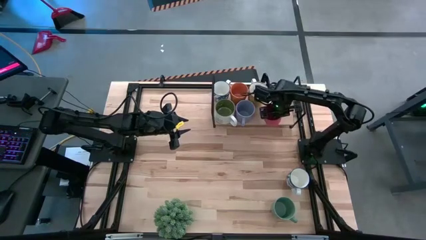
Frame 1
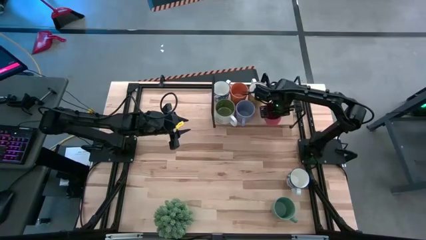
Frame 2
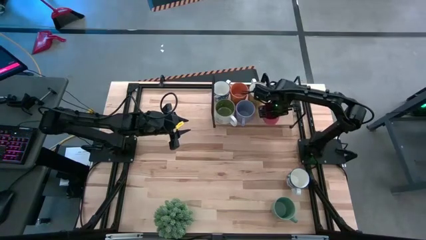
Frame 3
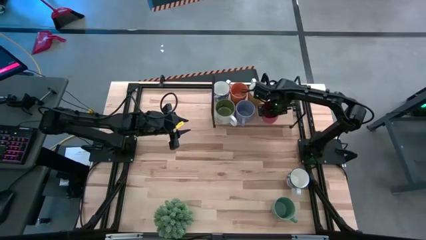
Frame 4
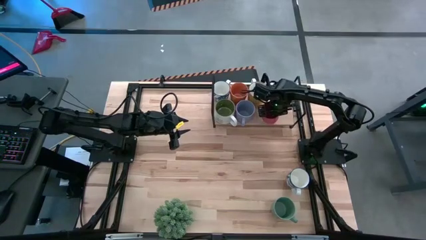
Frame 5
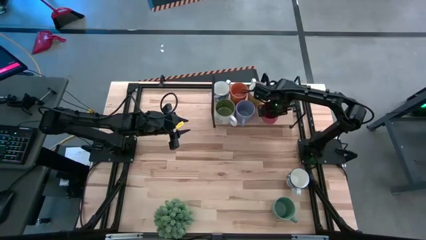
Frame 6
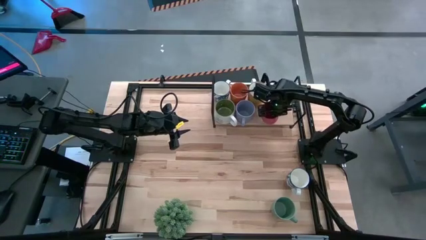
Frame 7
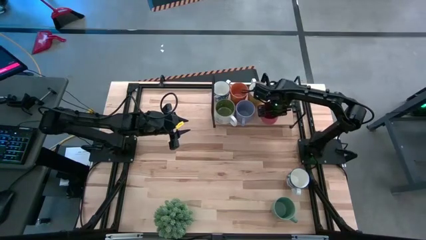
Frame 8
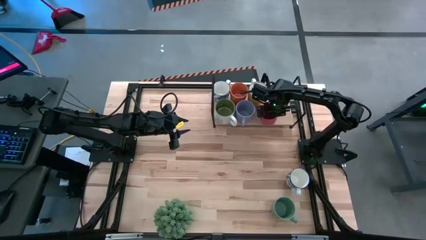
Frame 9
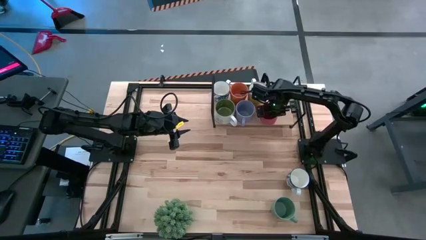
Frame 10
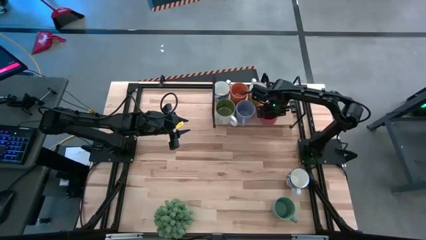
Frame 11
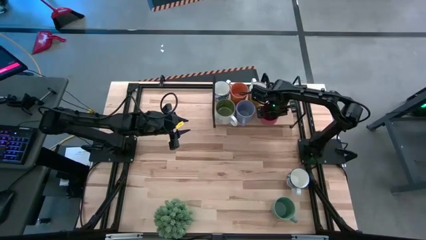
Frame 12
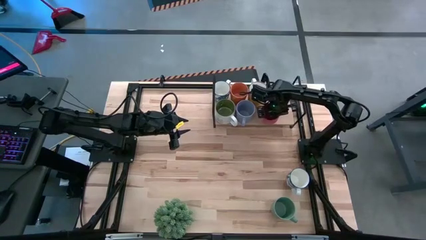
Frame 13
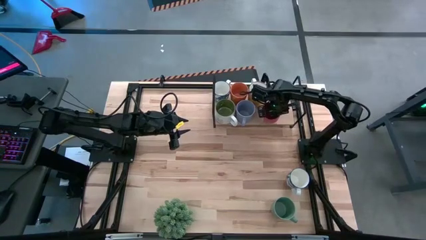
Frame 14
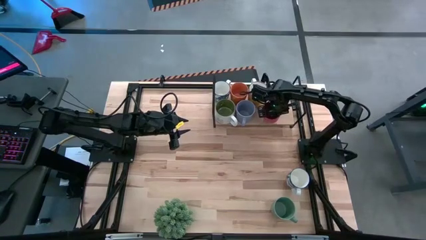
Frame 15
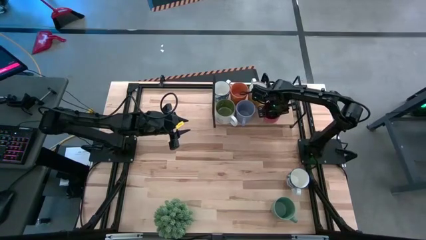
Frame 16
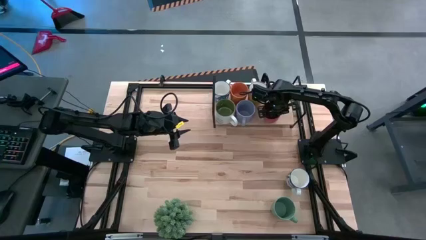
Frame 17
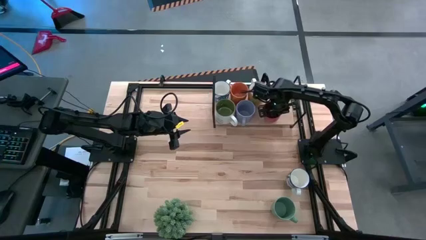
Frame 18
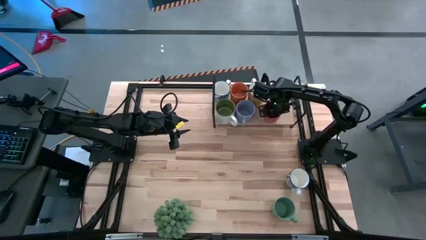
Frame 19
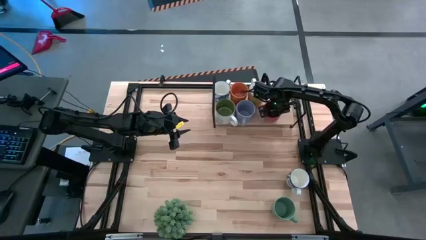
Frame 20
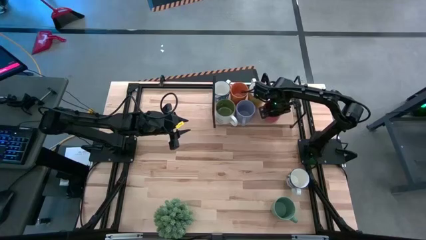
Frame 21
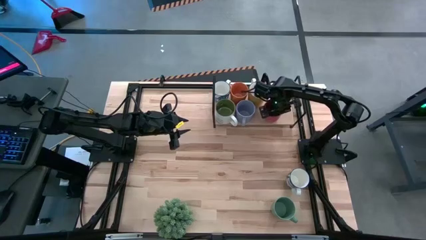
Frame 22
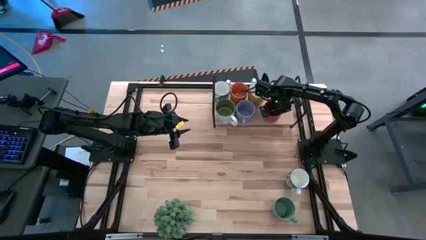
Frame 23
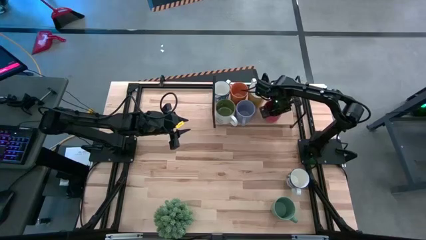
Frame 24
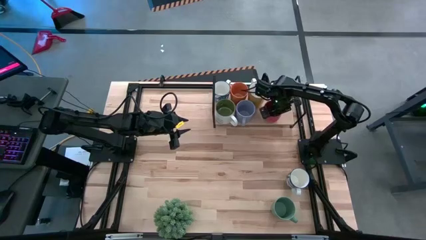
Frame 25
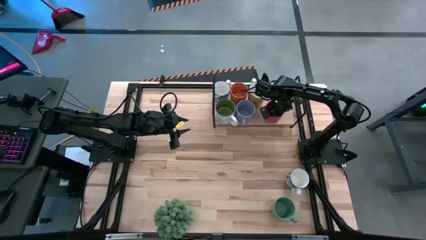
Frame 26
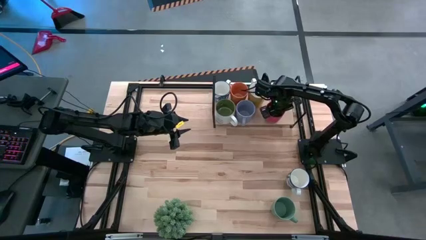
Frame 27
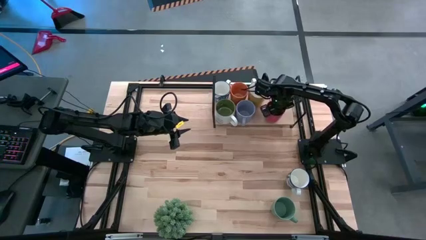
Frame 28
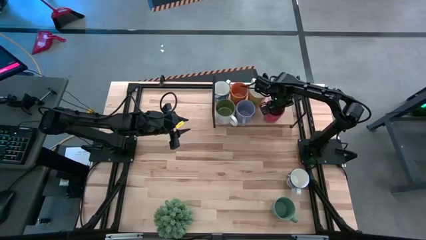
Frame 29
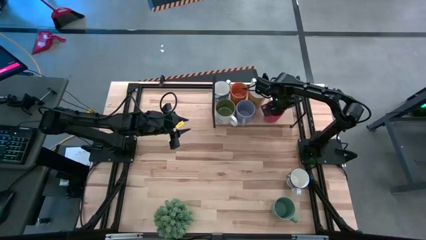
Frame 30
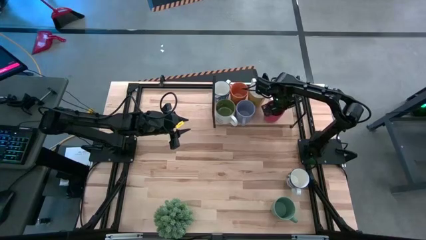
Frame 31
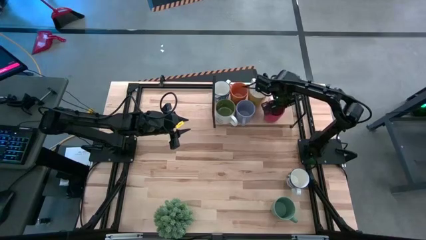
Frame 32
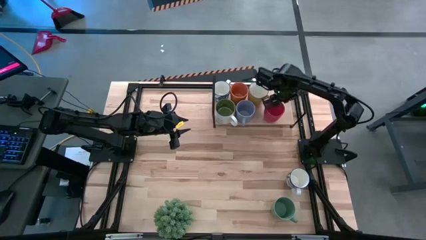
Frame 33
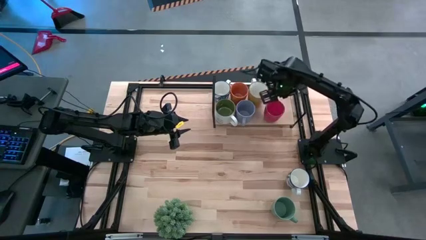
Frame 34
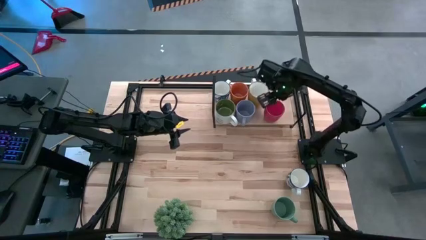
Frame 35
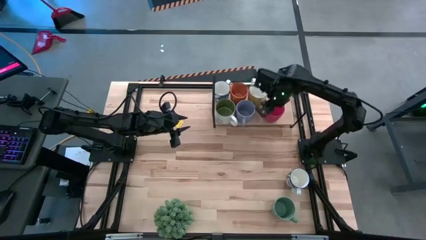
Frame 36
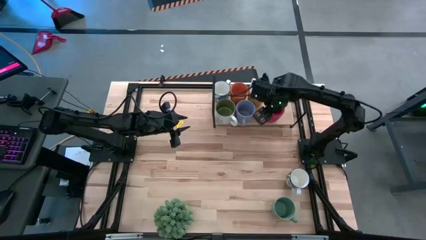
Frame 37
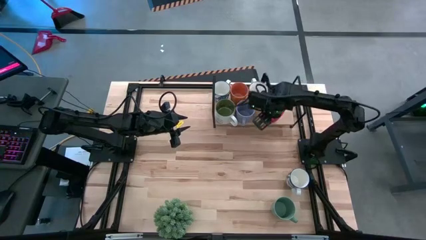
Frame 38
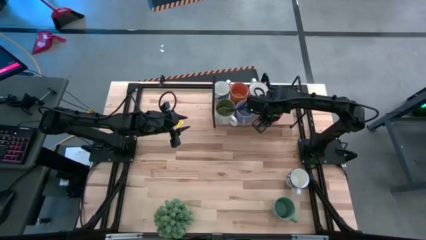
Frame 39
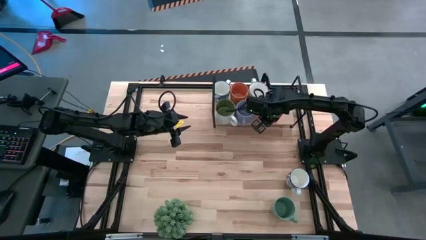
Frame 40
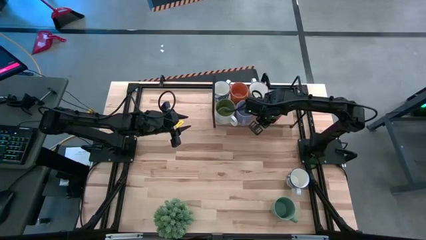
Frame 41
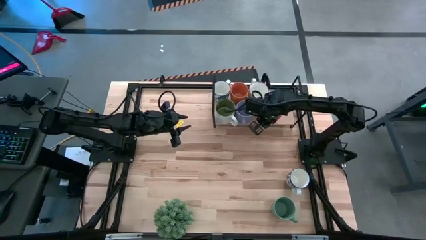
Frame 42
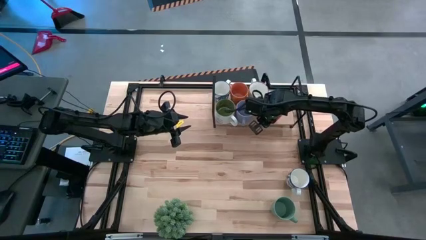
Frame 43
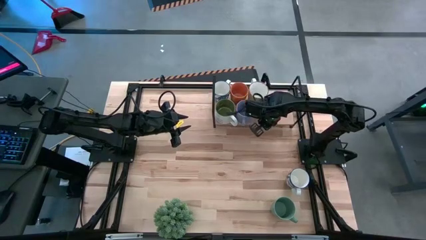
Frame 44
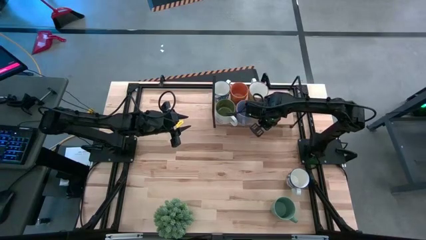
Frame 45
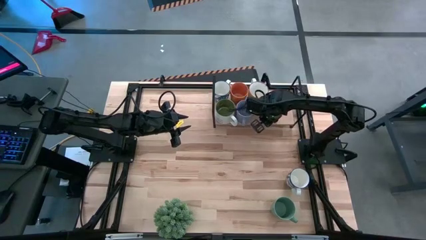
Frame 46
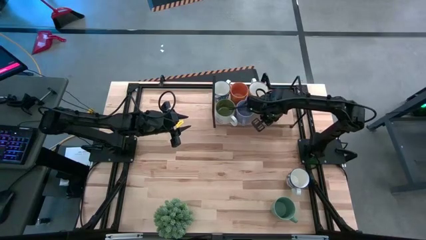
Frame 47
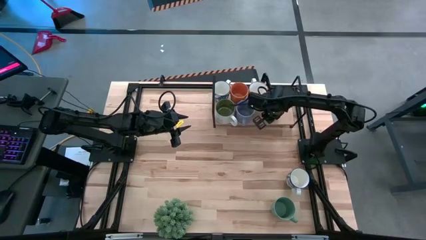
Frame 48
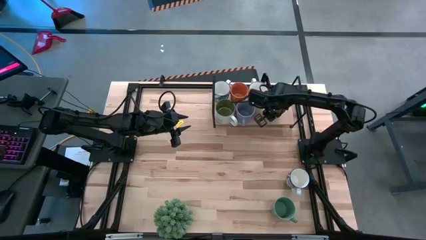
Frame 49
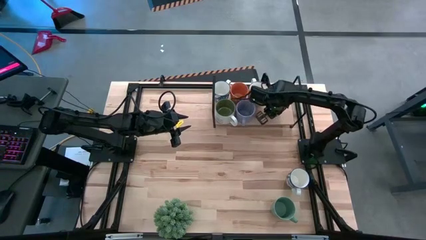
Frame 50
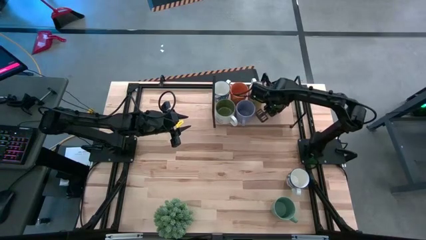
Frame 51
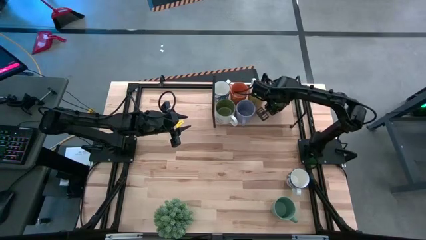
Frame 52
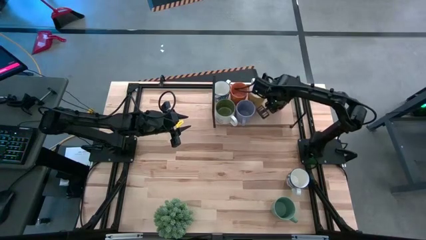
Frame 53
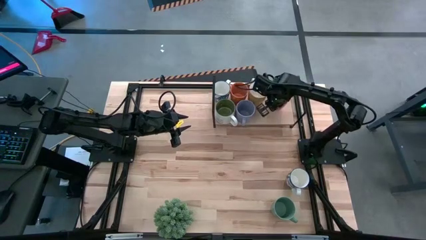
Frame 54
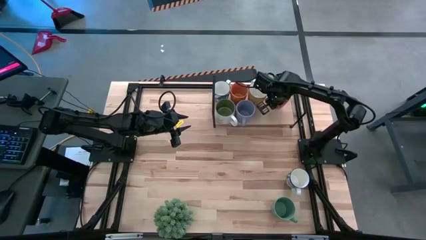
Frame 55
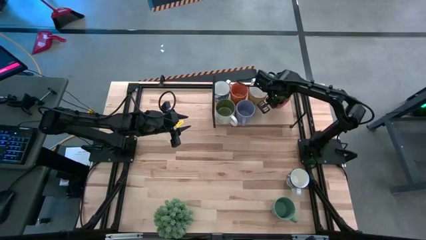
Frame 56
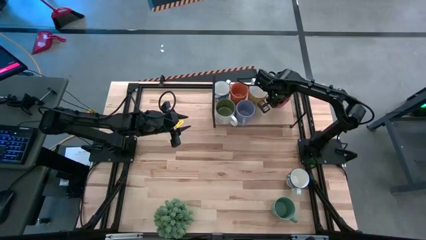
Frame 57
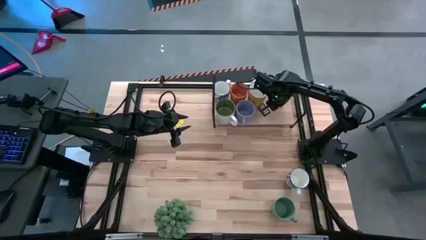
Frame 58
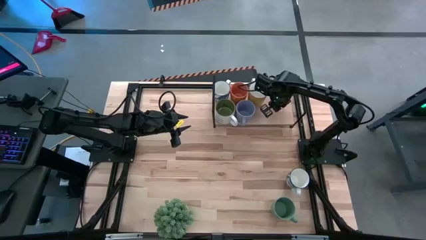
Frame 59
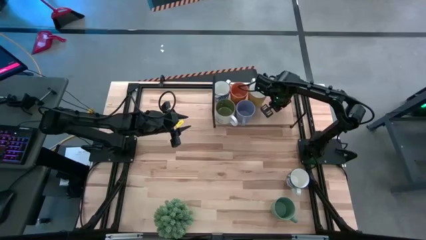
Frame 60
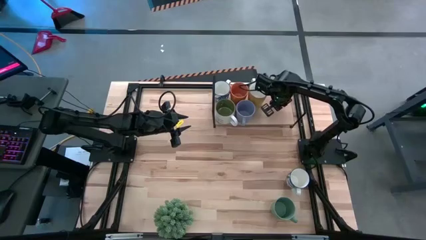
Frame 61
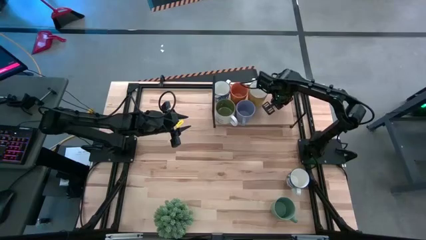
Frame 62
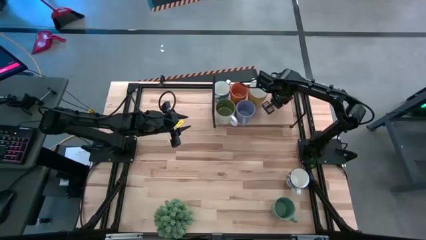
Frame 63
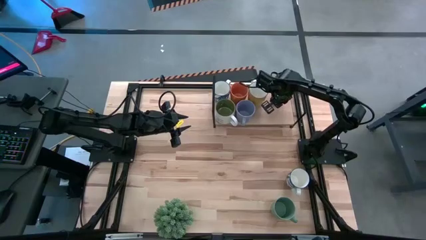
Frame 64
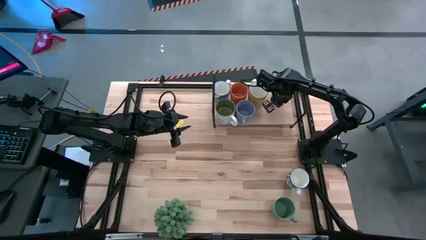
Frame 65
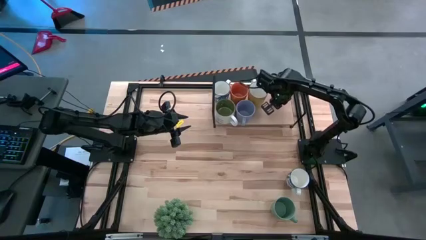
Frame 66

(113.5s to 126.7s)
Task: Place coffee mugs
Put the red mug on the shelf

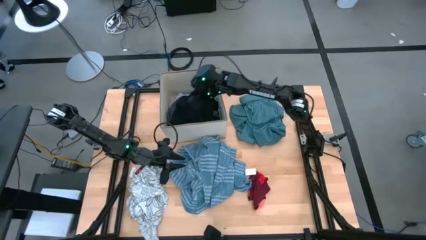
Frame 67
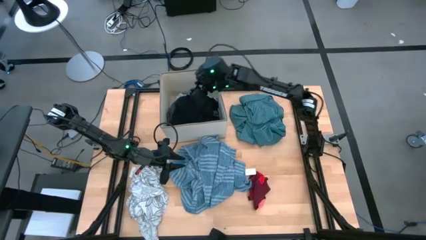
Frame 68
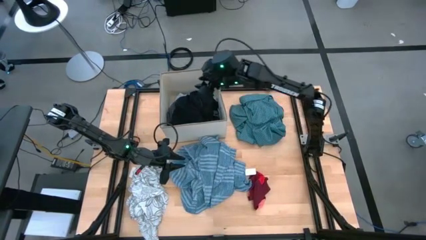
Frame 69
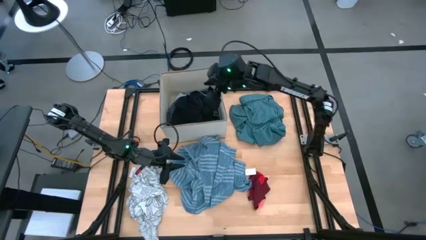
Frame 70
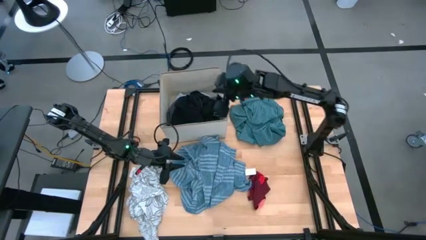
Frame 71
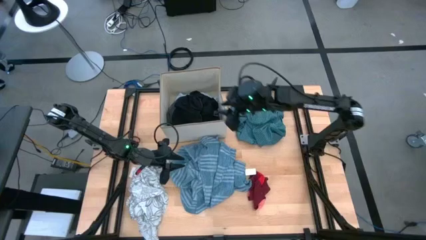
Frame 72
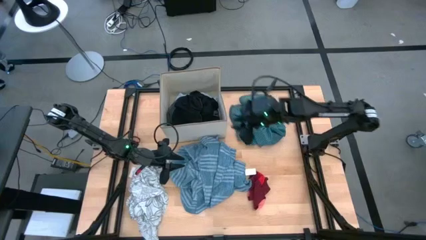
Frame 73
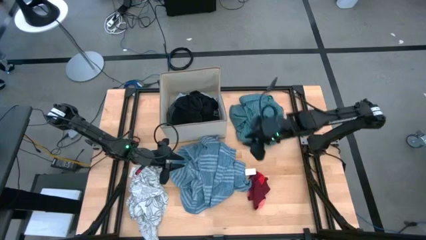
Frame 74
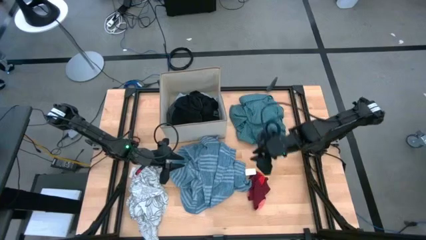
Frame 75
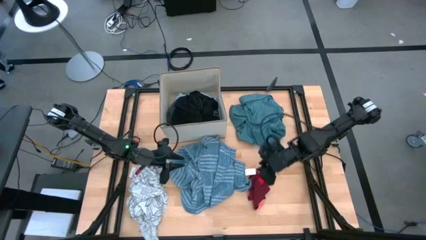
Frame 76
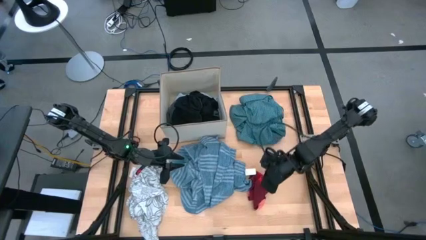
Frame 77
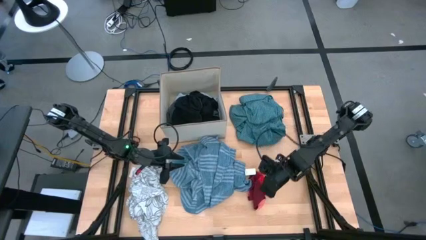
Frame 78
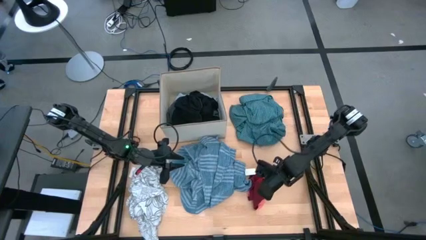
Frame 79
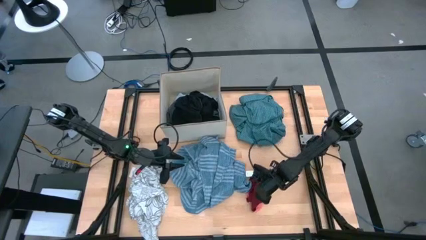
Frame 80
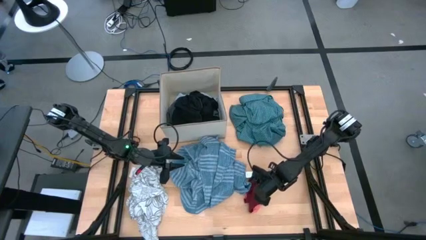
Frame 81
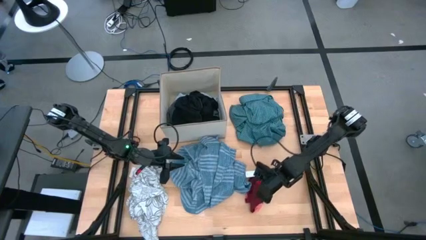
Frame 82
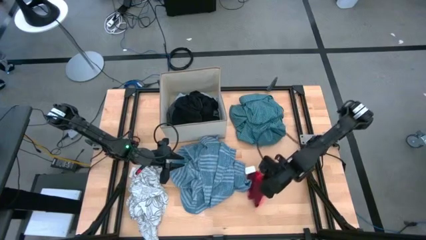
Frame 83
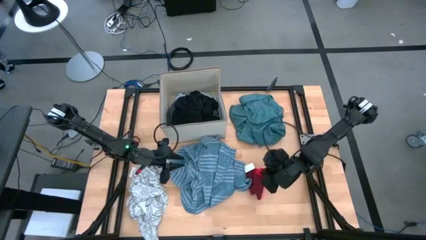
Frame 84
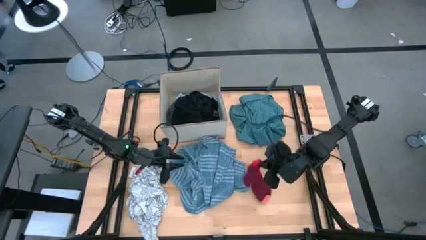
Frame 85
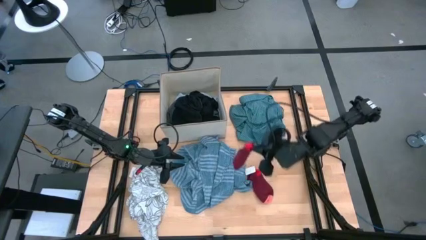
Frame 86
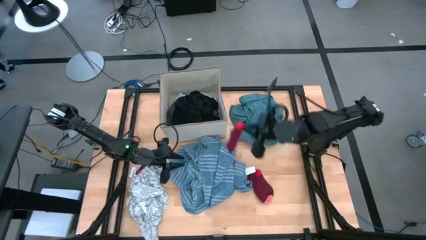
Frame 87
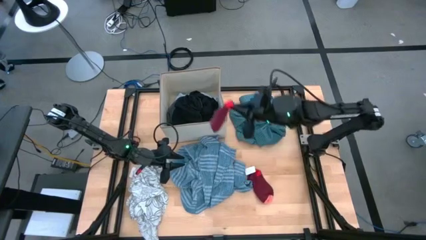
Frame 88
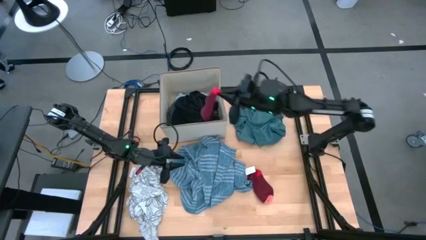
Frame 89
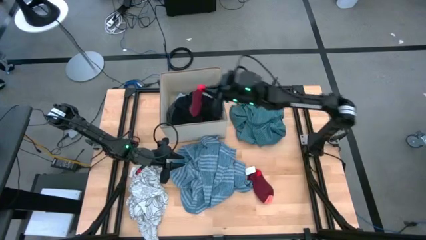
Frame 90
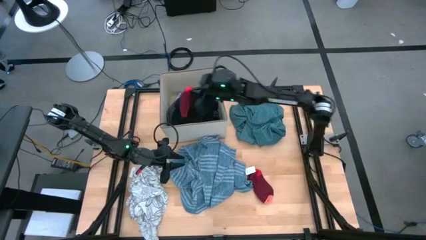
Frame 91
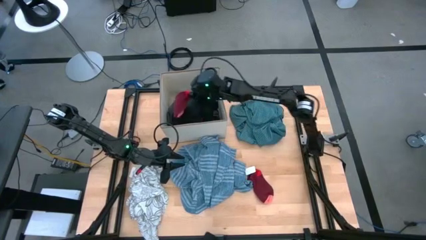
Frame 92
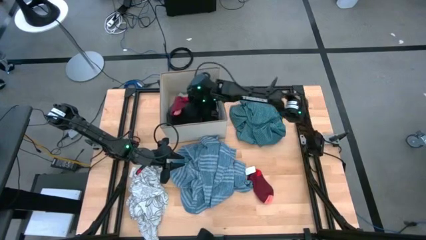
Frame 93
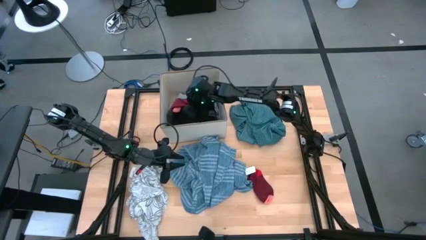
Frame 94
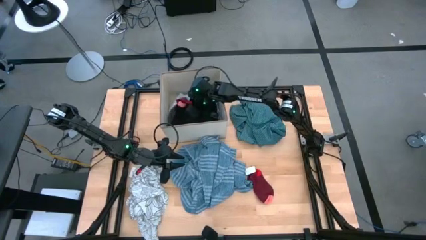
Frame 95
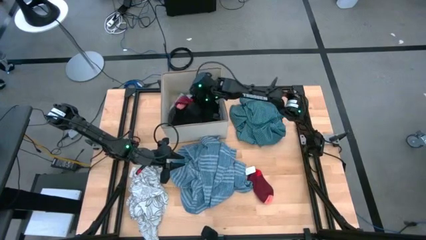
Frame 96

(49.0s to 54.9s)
Task: Sort clothes
Put the red sock into the white laundry organizer
